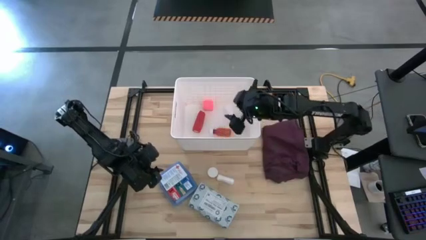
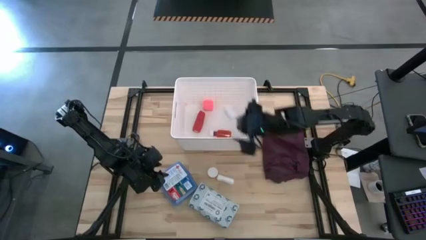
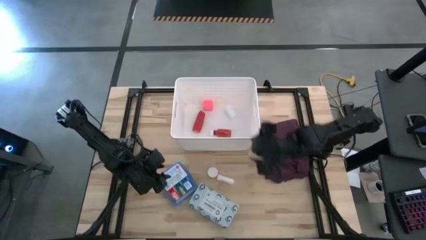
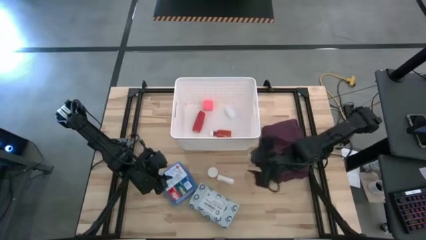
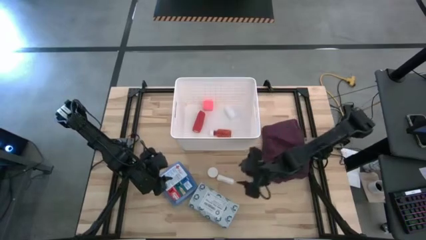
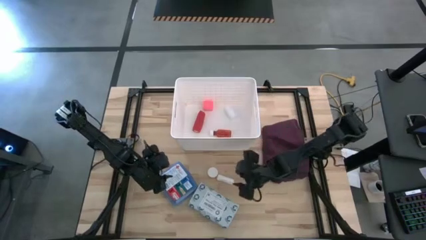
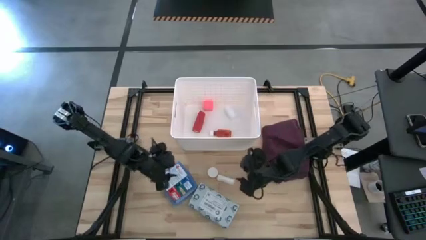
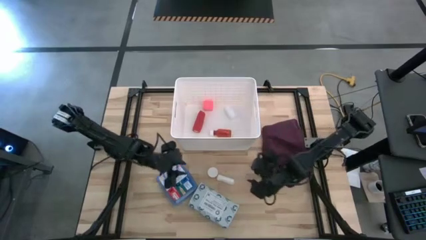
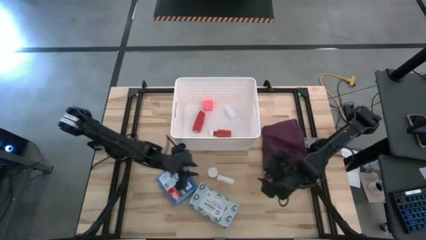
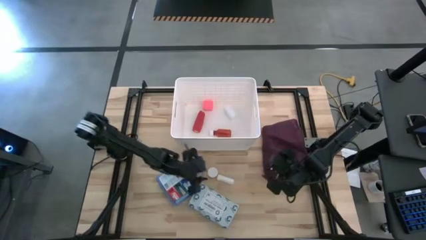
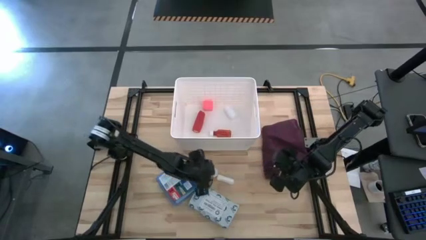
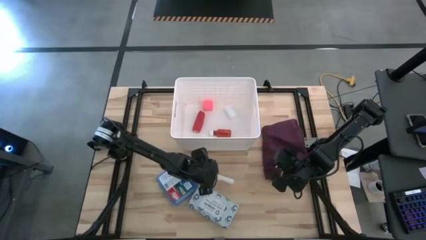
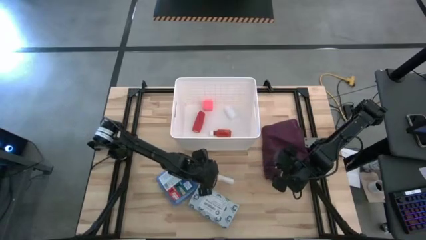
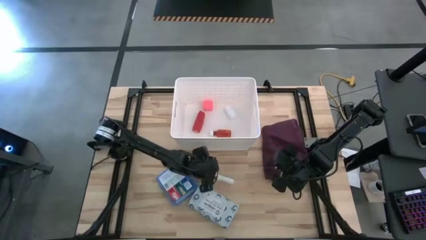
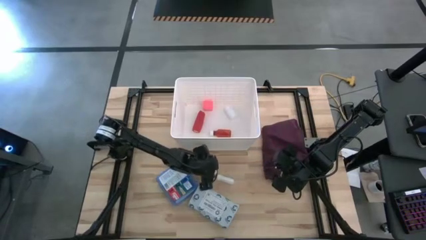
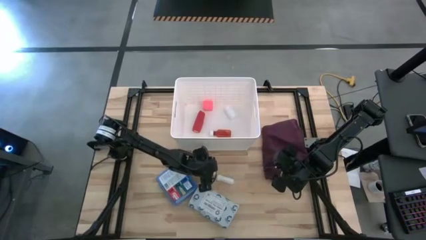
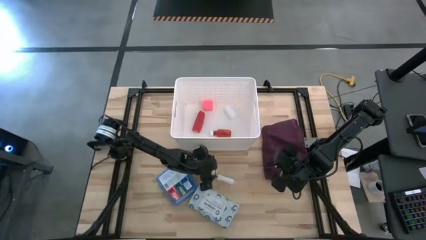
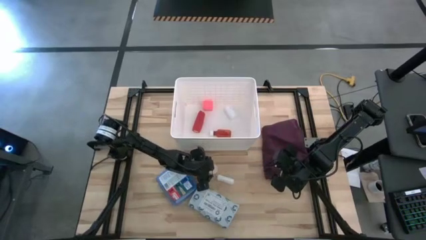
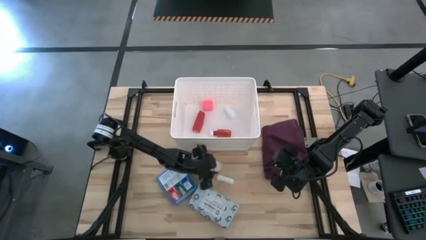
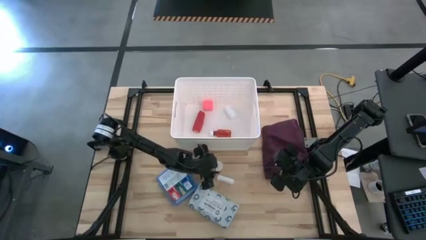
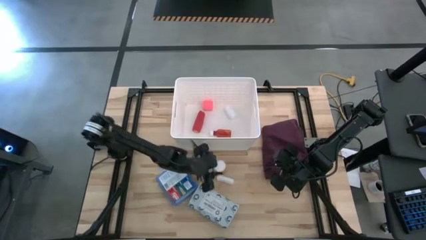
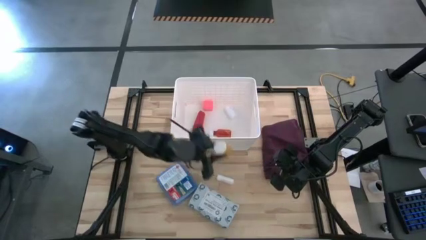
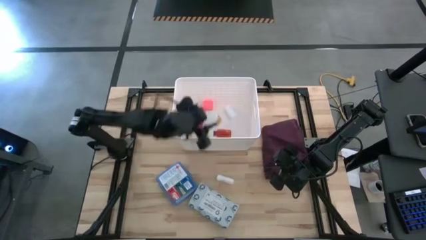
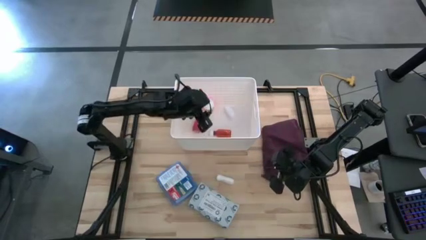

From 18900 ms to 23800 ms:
Task: Pick & place medical supplies in basket/bin
Put the orange pill bottle into the white basket

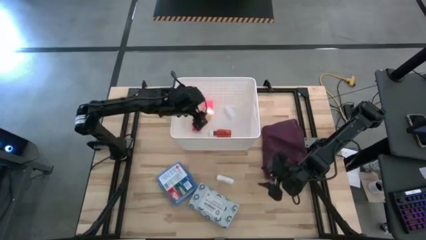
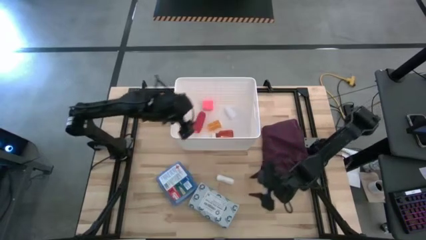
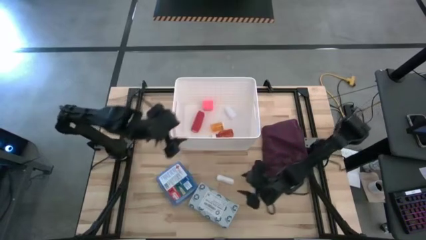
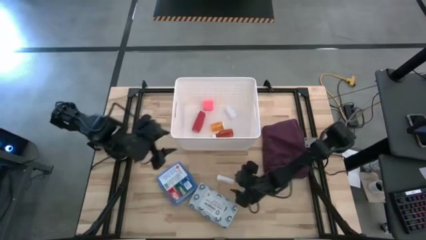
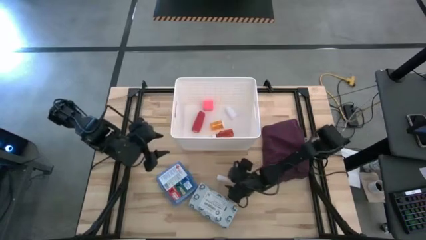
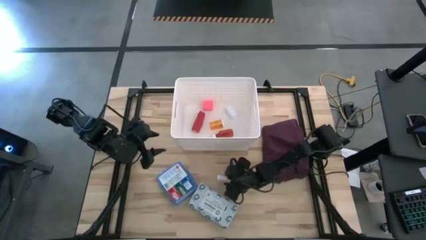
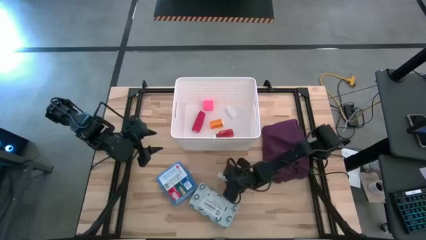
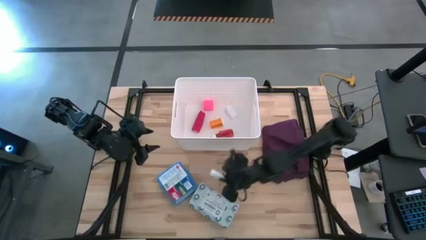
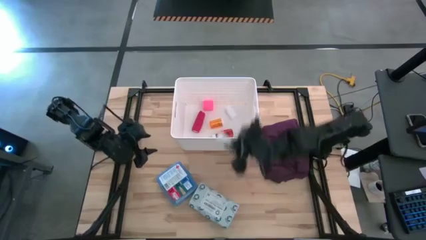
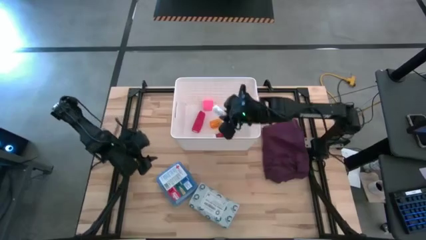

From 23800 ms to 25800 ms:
Put the rolled gauze into the white basket

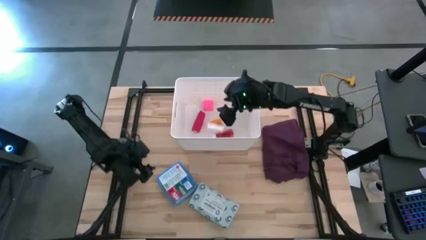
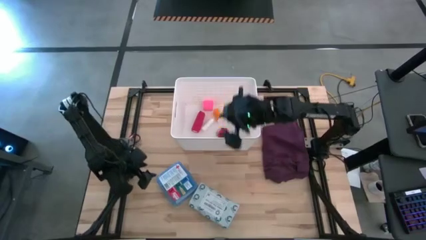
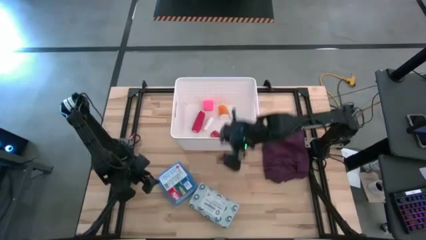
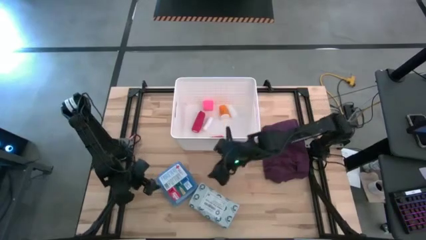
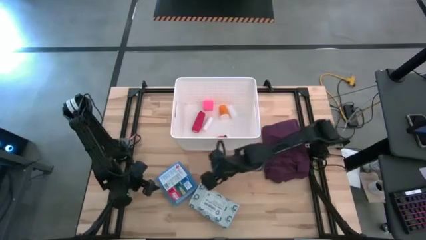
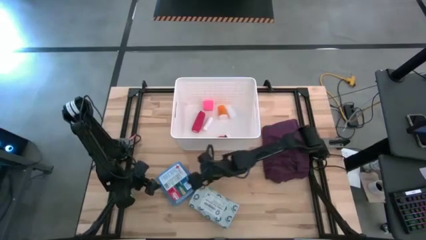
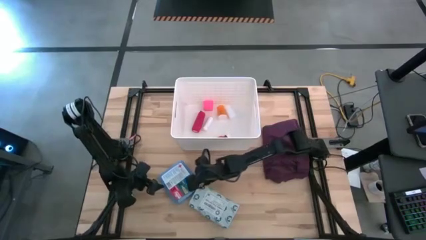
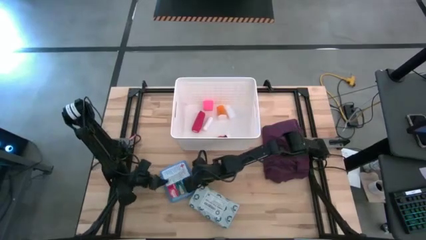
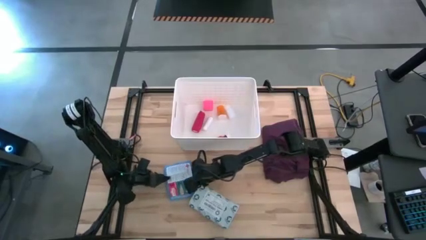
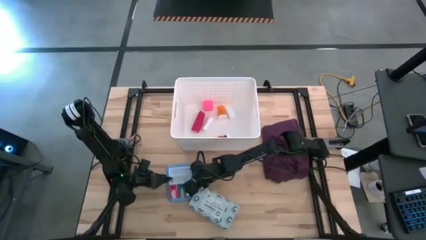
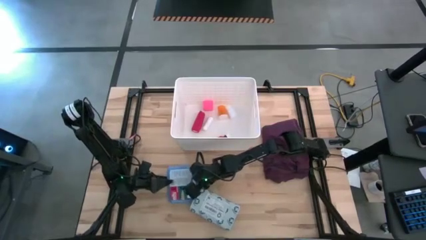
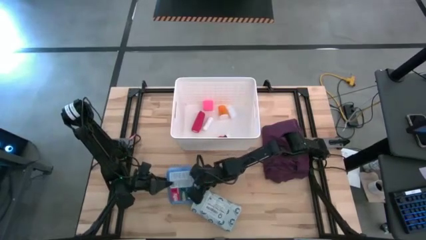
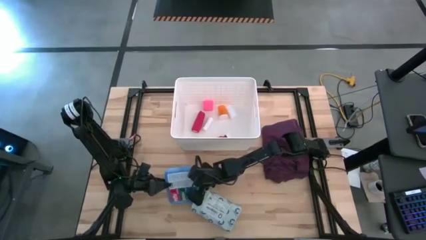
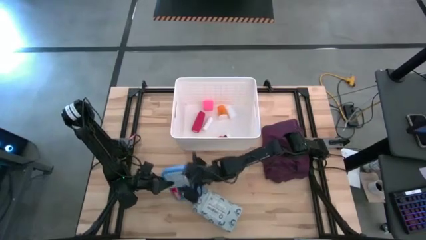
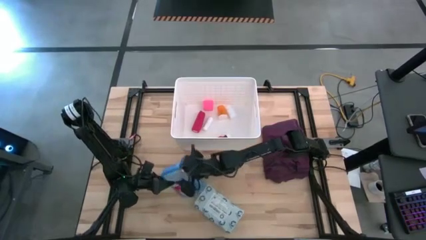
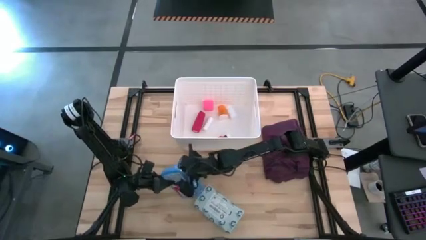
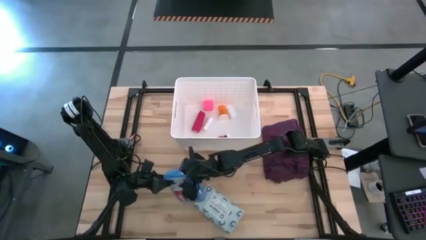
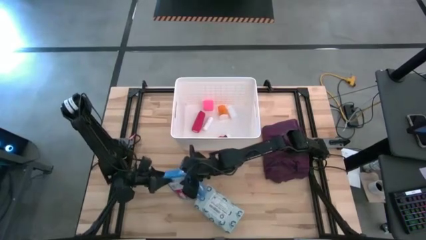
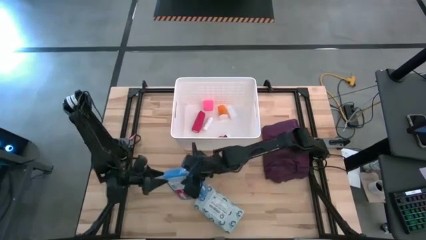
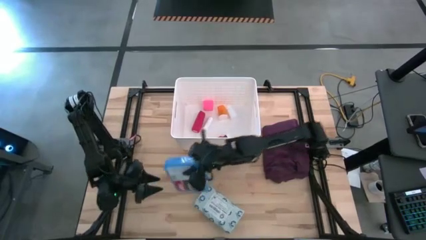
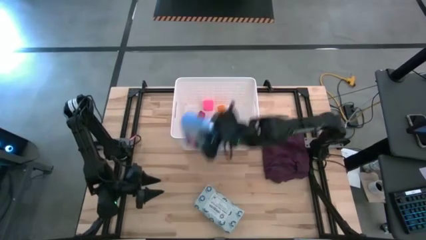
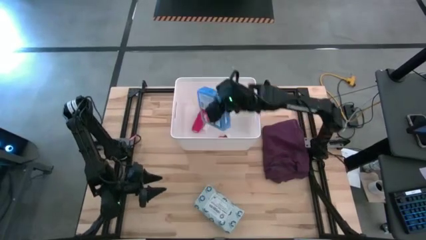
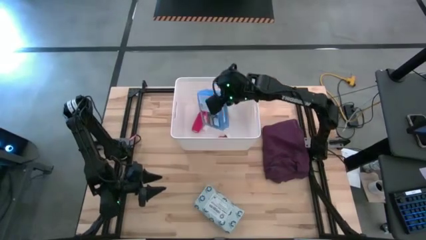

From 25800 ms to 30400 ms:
Put the medicine kit into the white basket

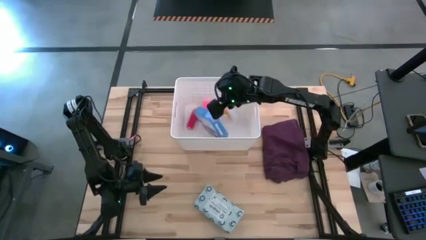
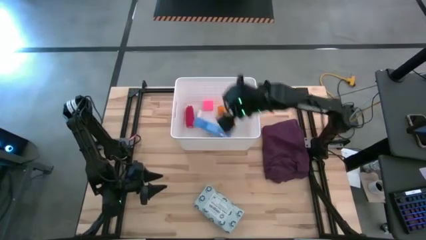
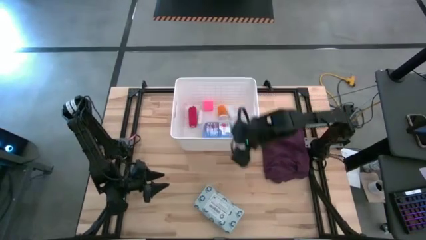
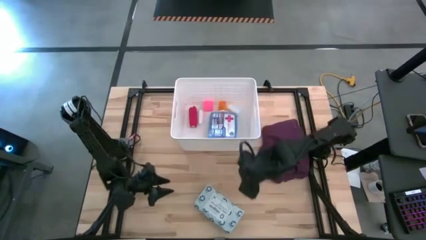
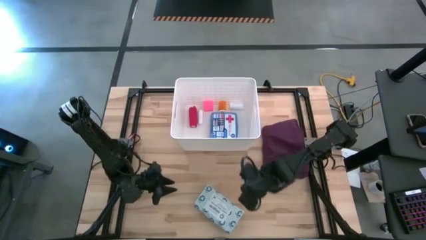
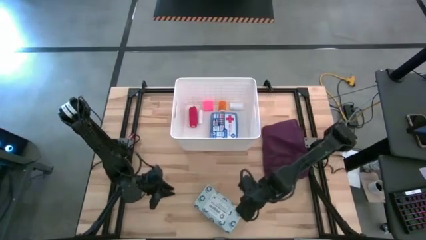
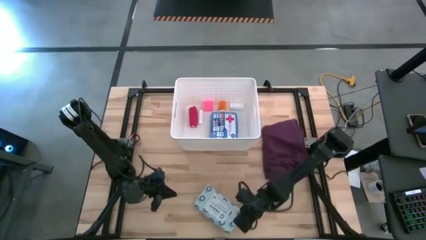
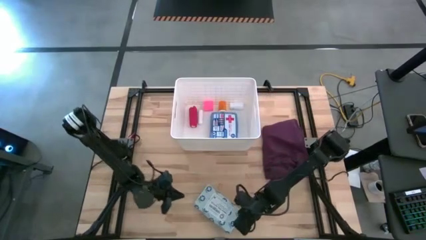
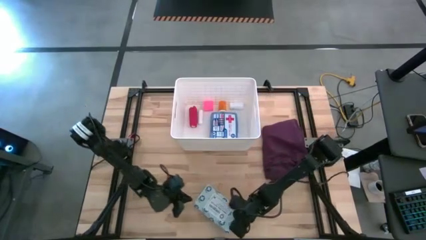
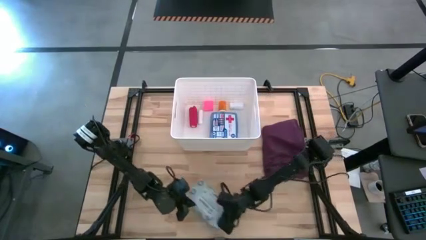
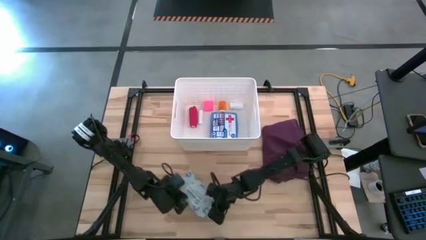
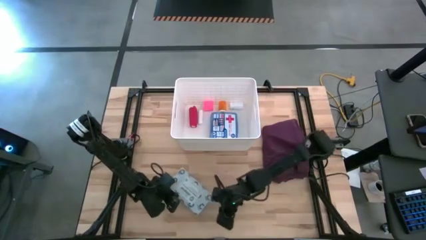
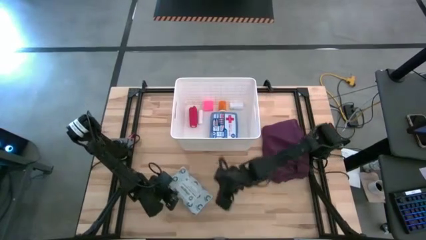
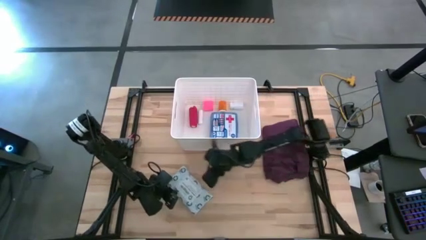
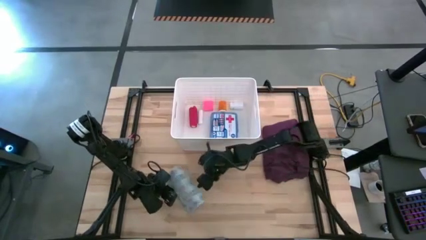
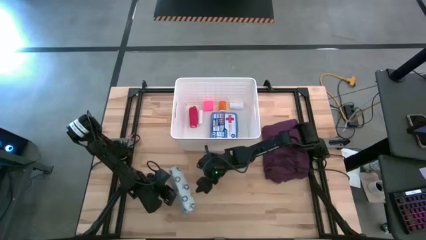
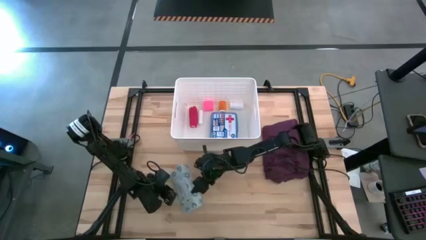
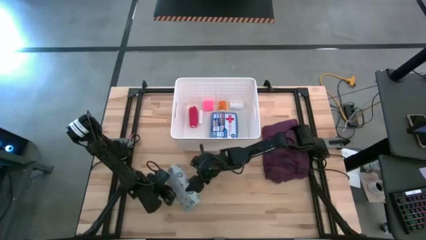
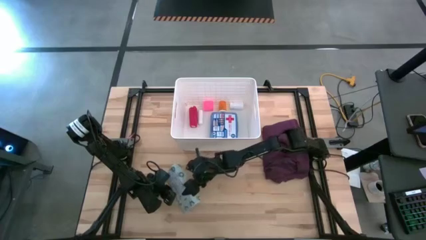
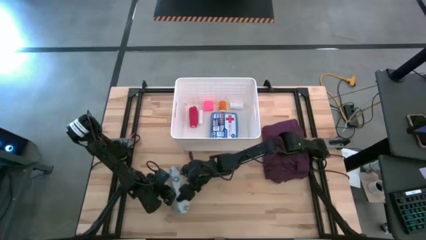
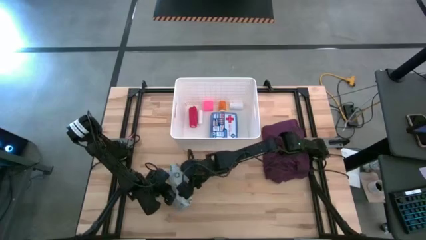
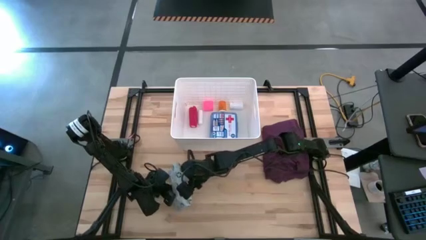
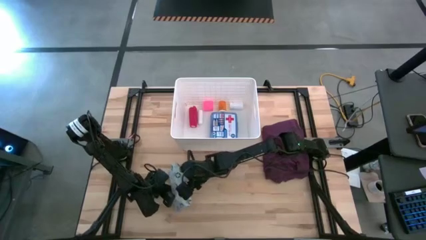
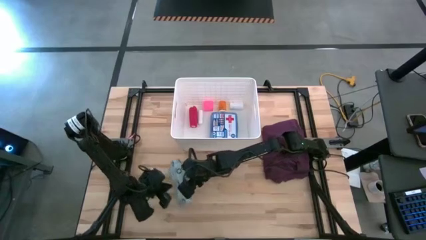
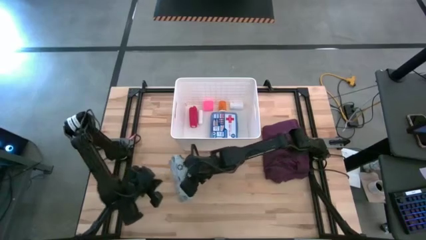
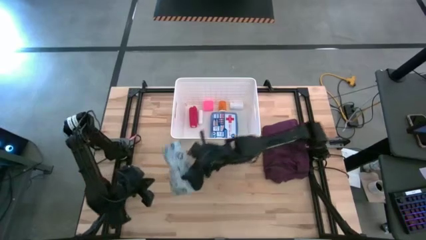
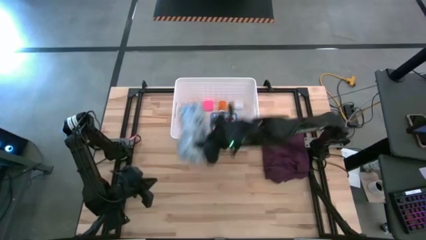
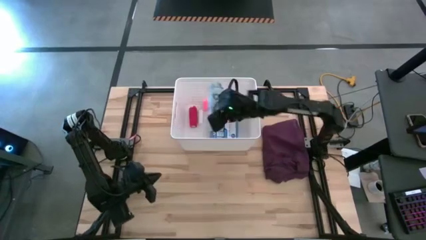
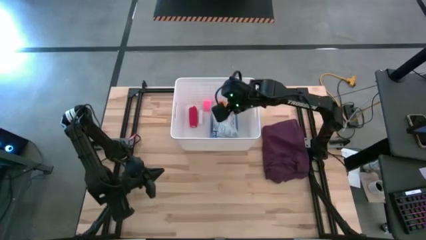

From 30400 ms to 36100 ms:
Put the mailer bag into the white basket
